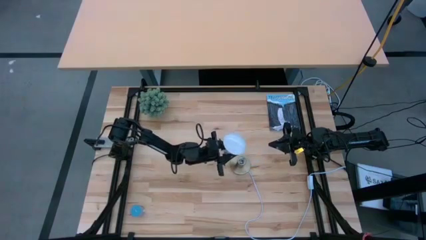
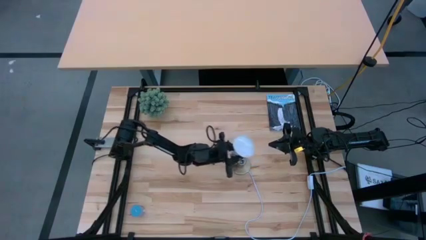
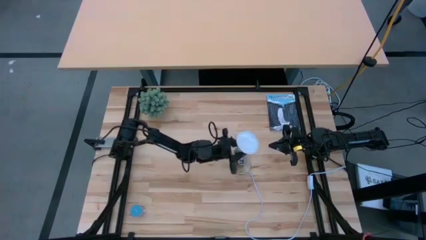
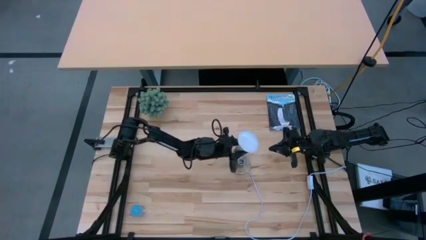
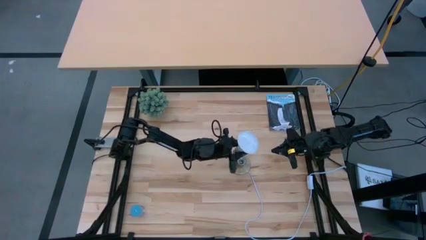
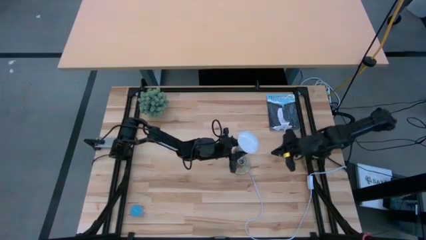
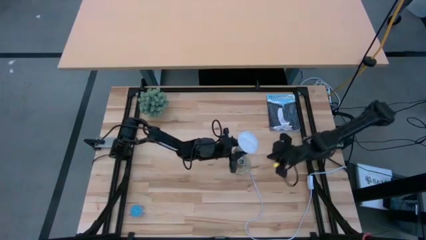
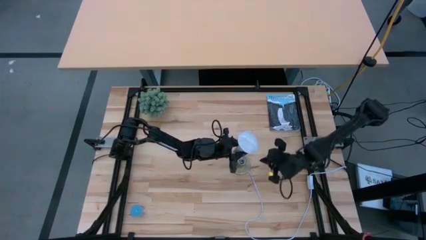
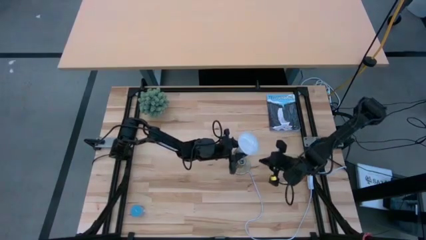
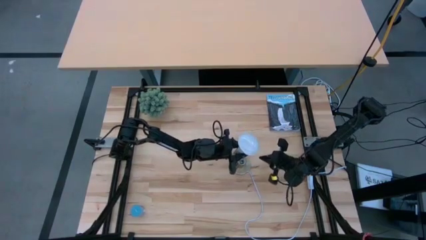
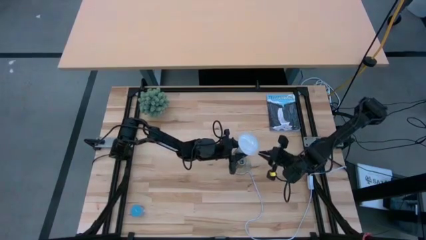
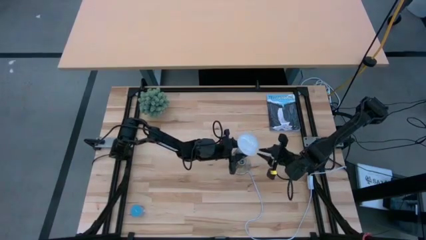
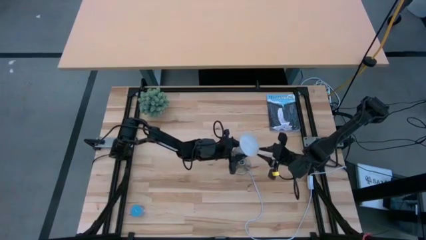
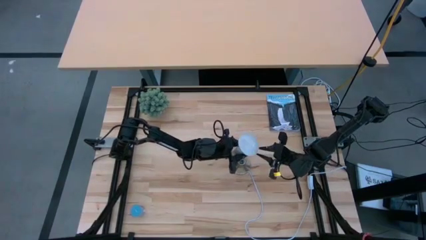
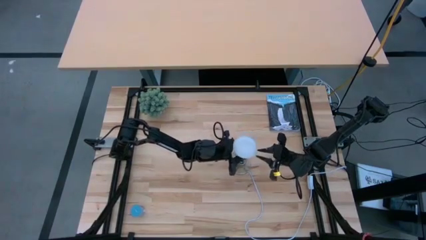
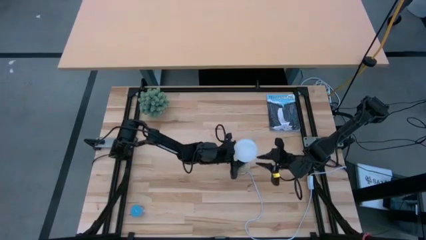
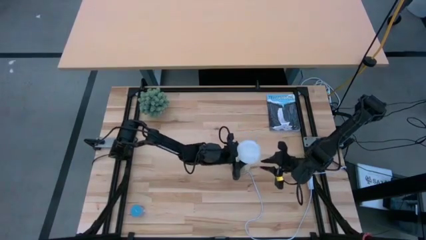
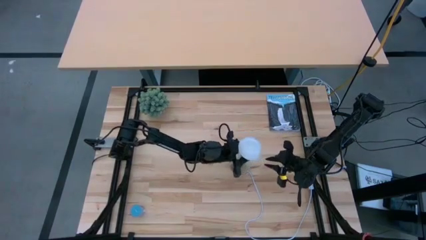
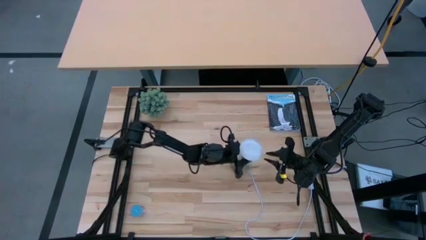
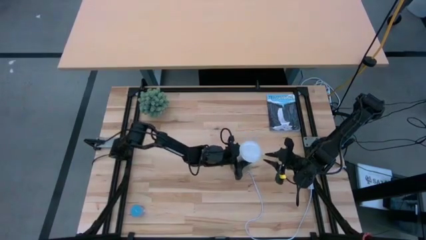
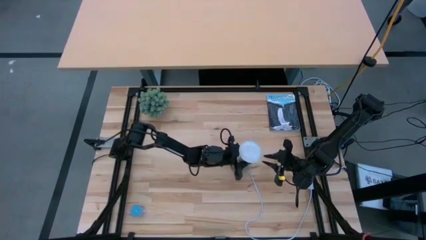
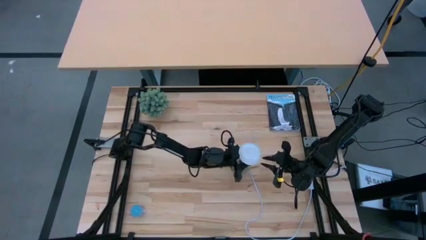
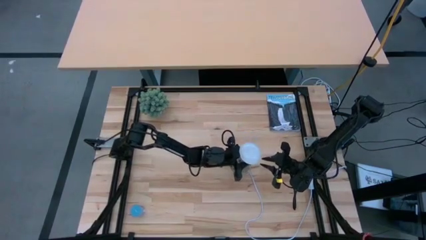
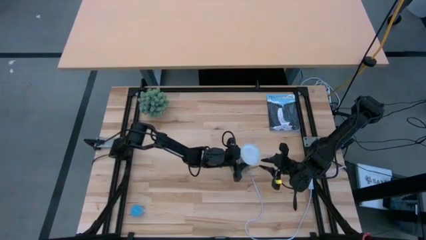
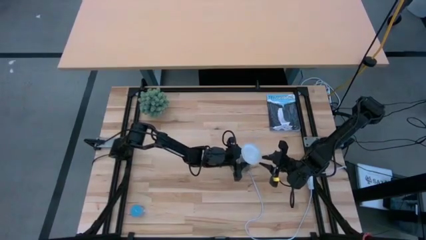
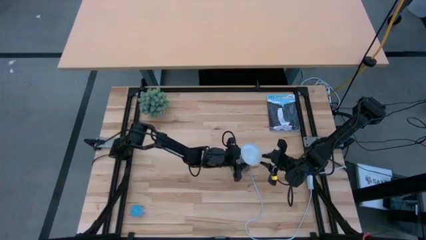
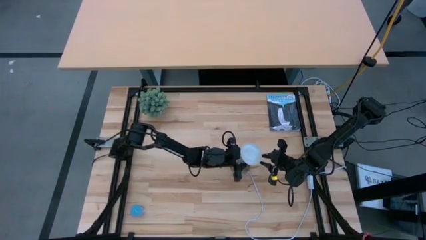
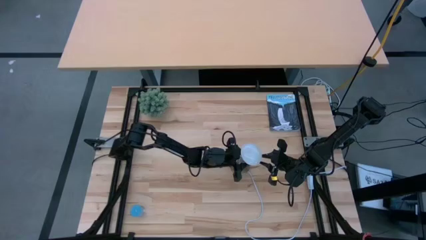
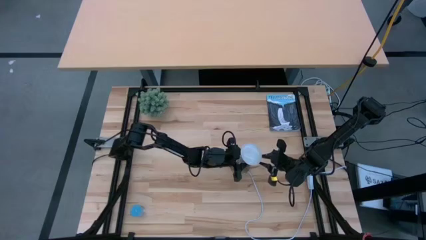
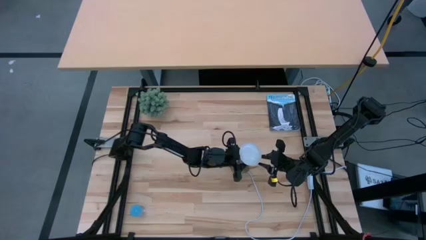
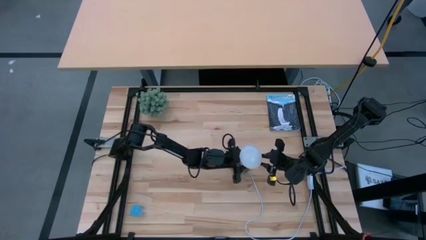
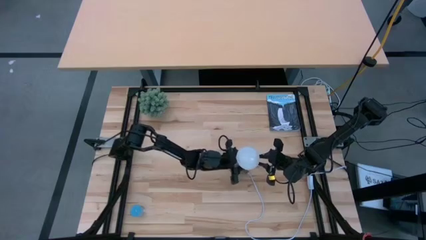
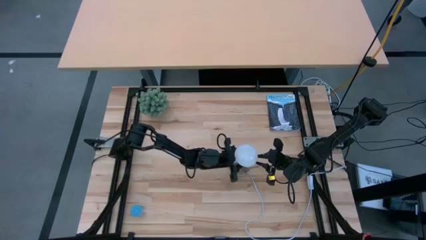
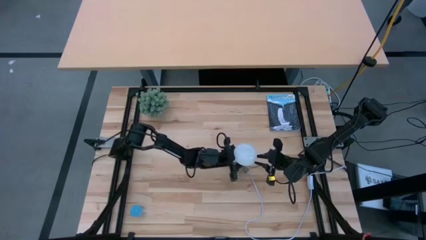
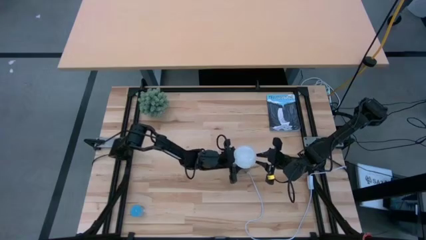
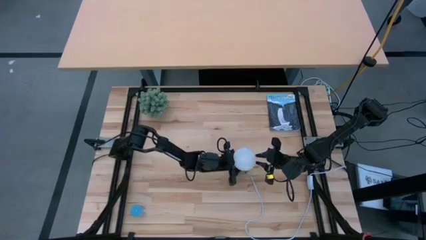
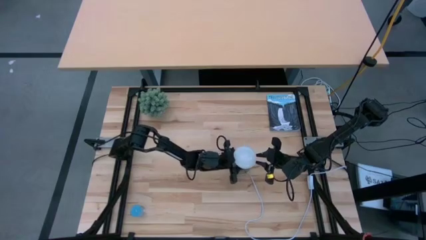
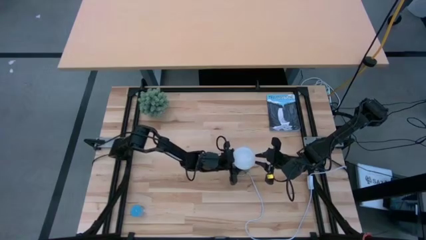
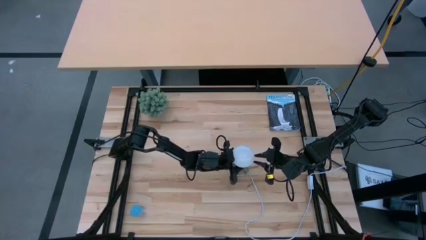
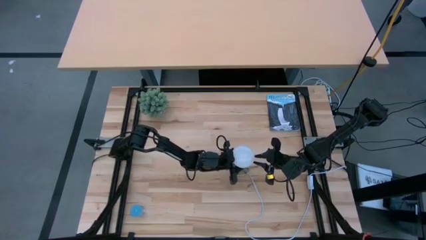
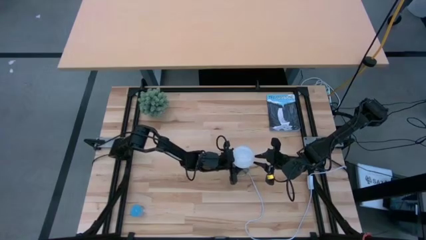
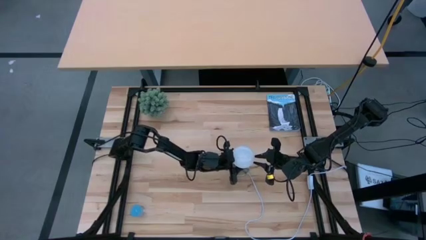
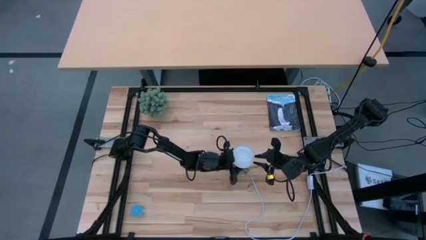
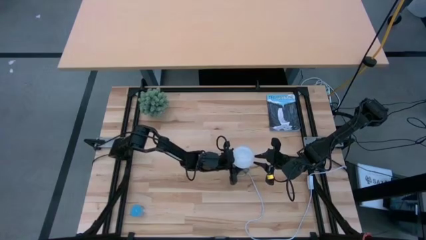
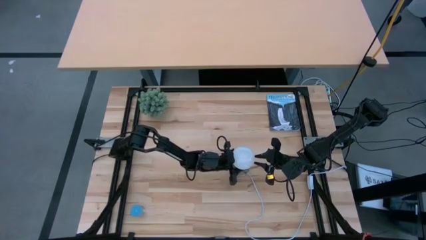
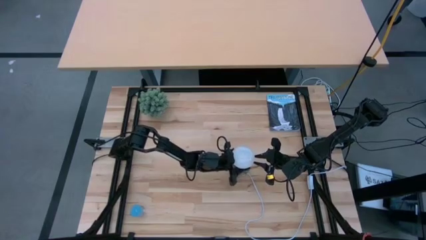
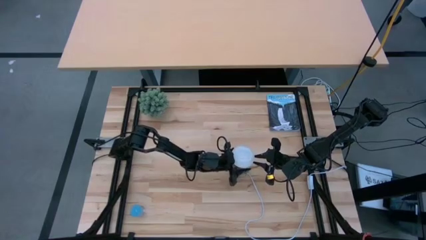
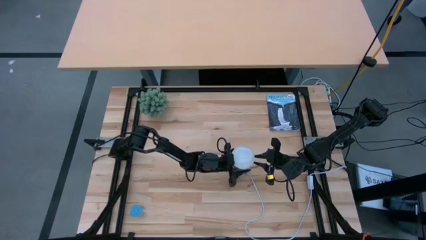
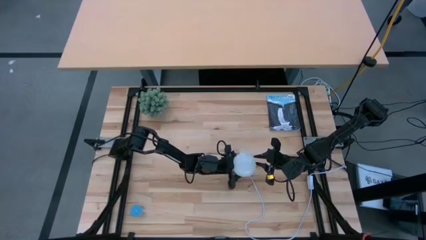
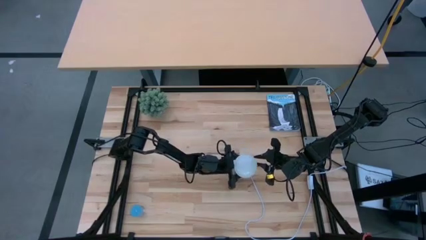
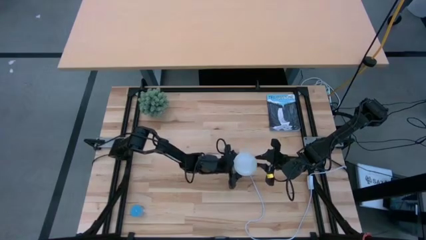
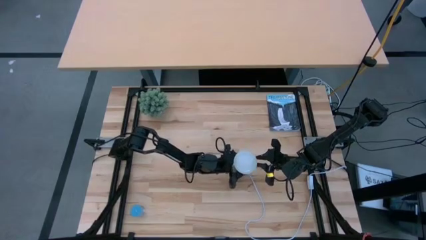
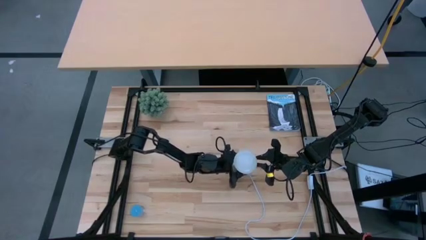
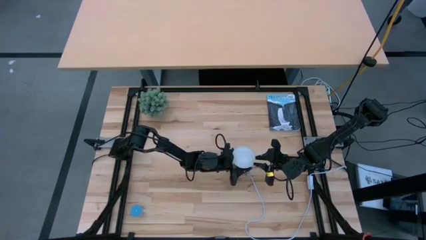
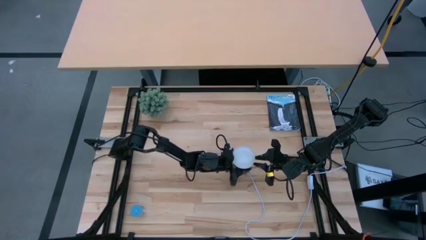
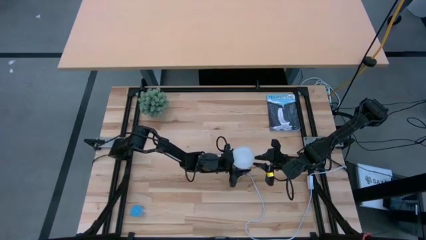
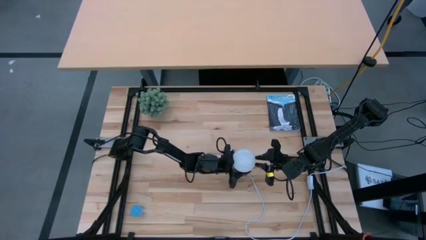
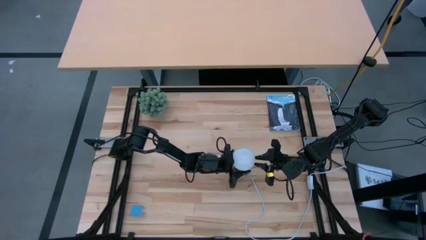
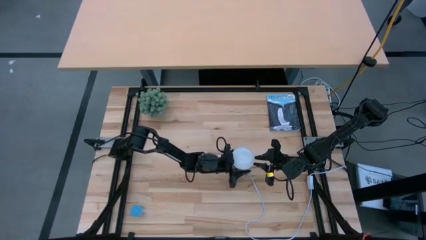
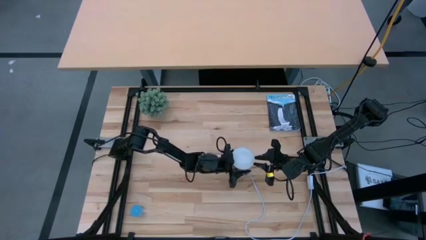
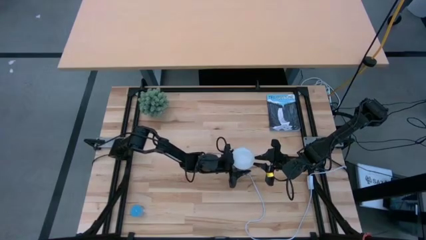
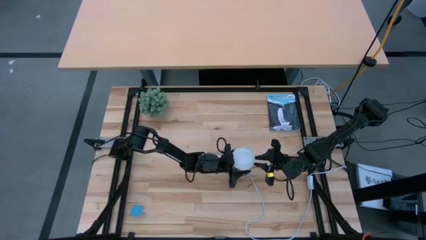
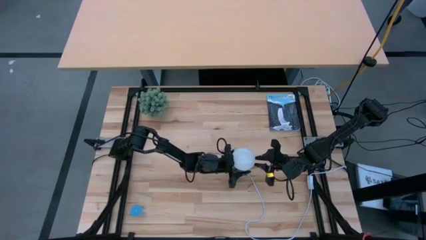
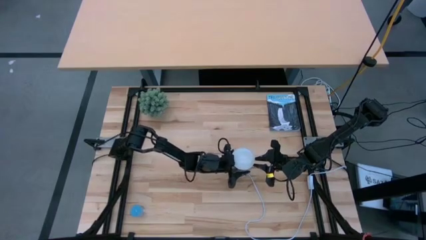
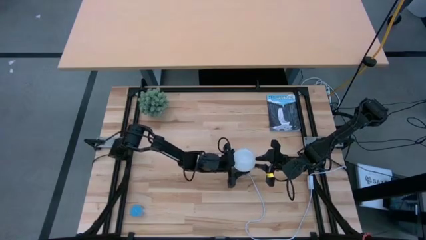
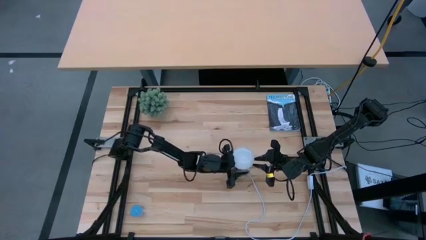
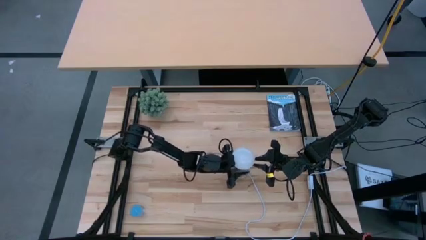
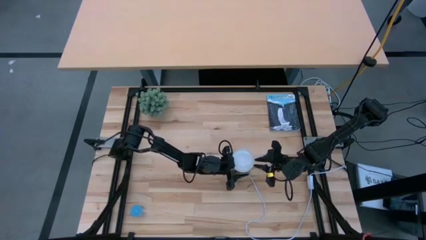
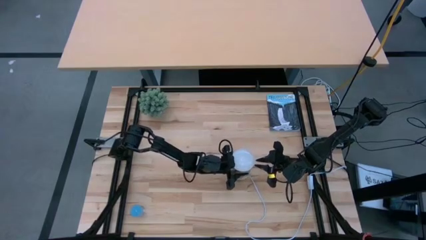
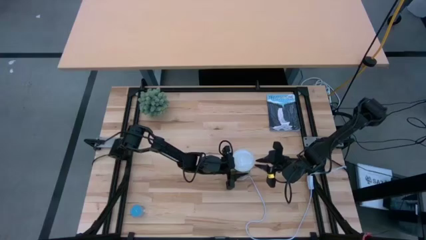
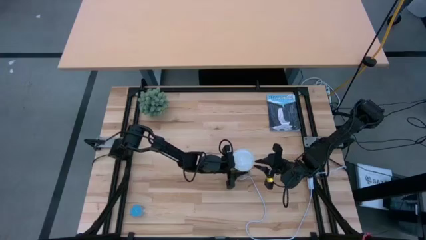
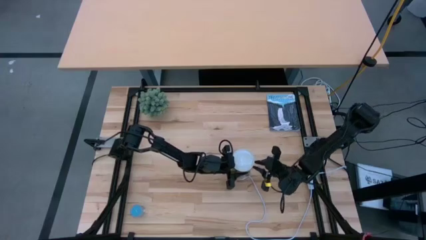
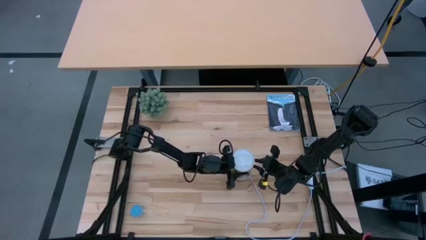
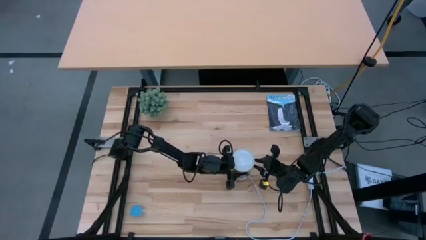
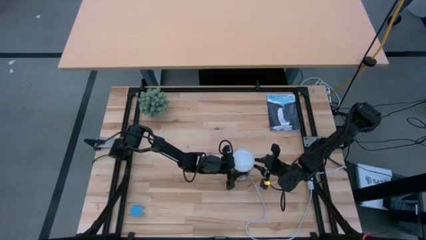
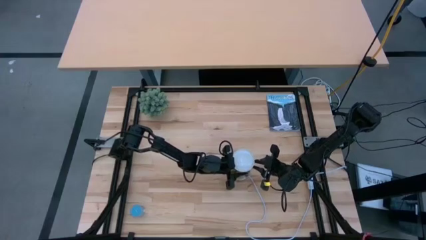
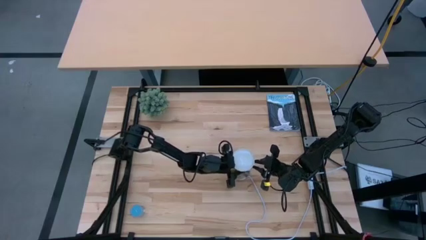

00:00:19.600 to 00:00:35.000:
Task: Screw lightbulb
Insert the lightbulb into the lamp

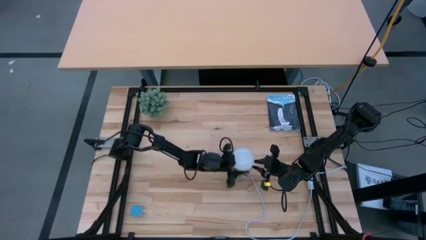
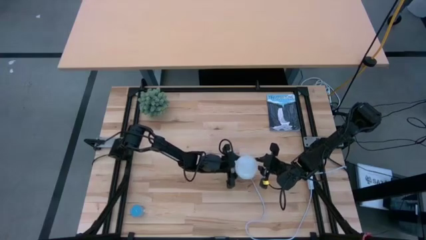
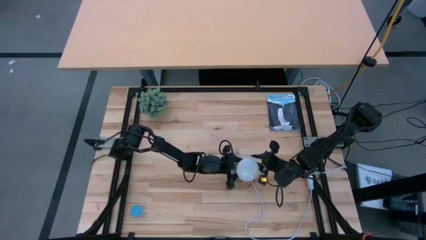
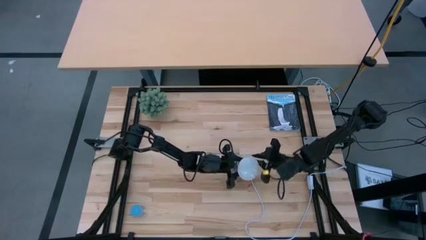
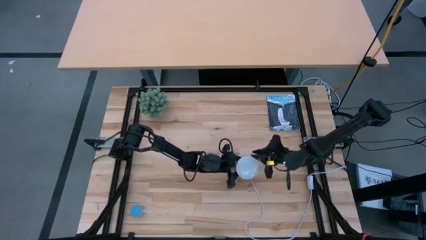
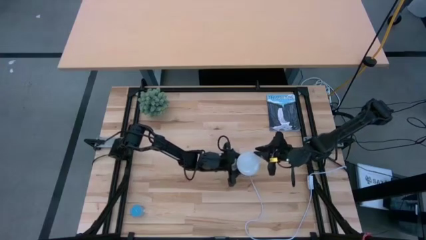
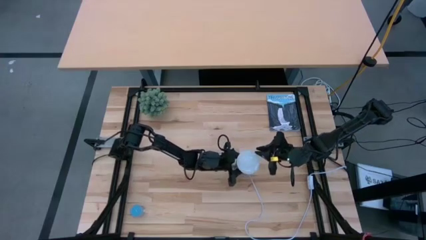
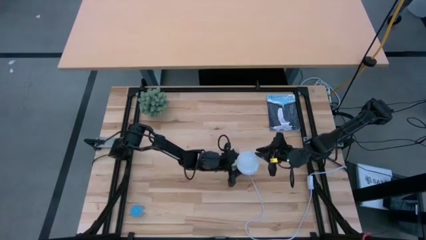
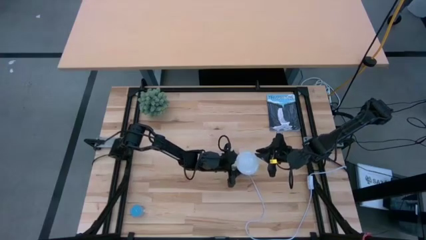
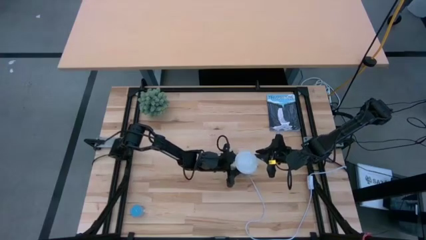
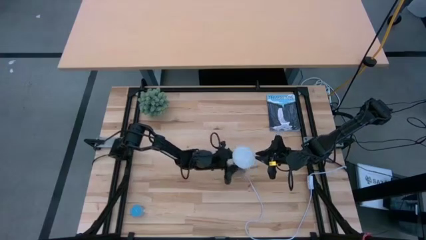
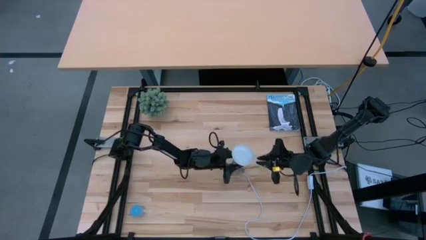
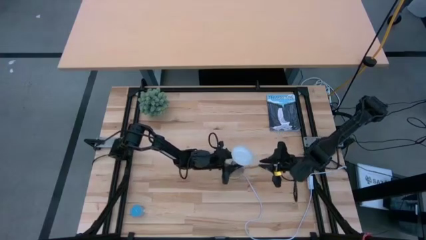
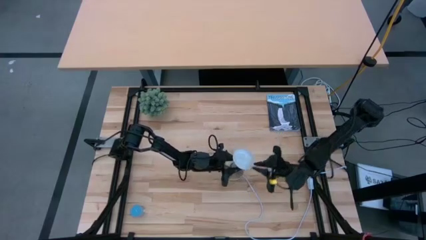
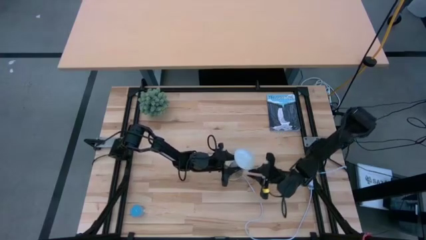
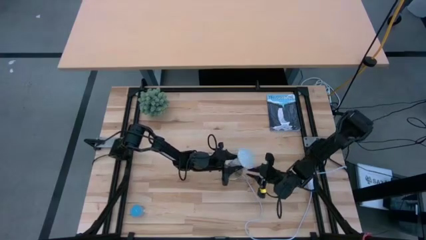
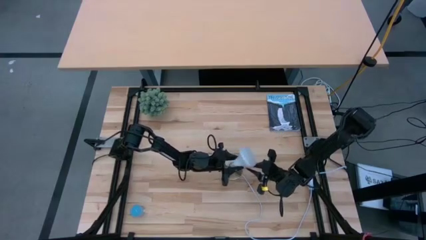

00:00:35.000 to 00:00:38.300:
Insert the lightbulb into the lamp
